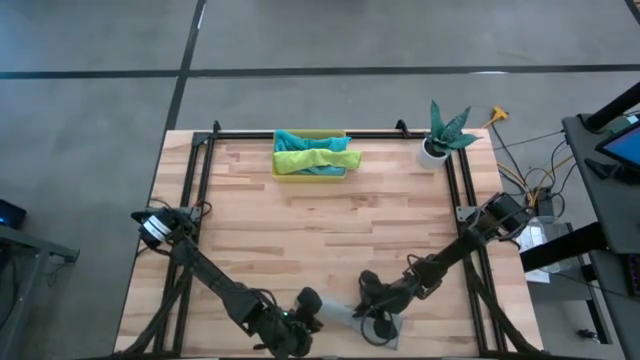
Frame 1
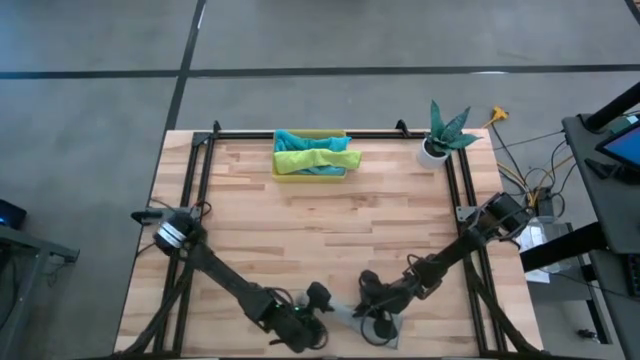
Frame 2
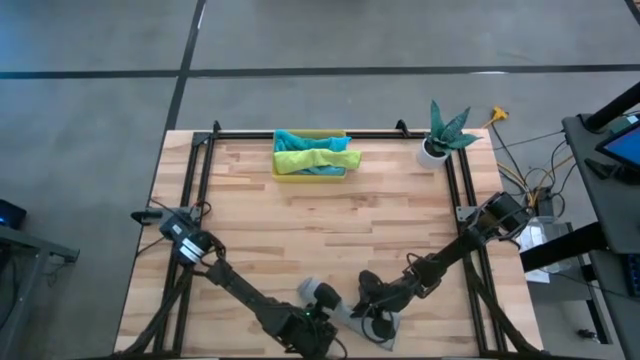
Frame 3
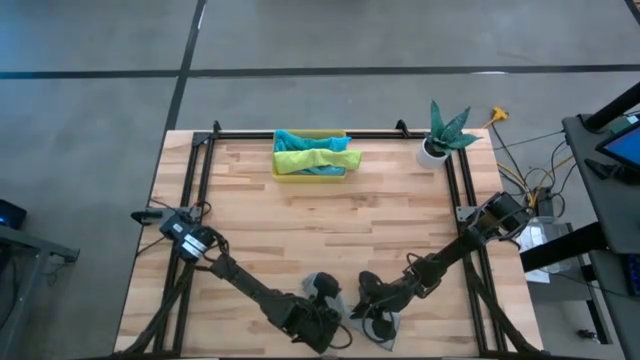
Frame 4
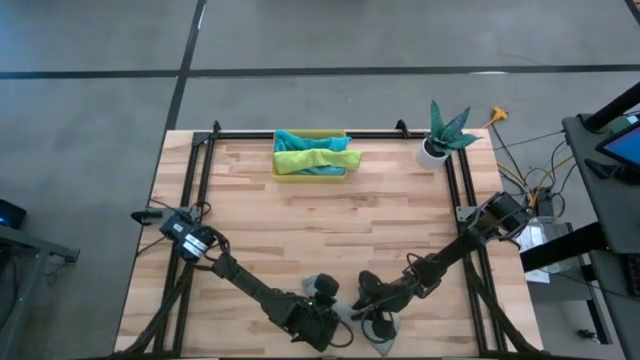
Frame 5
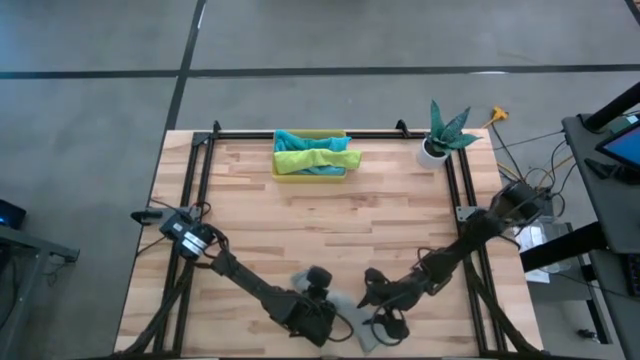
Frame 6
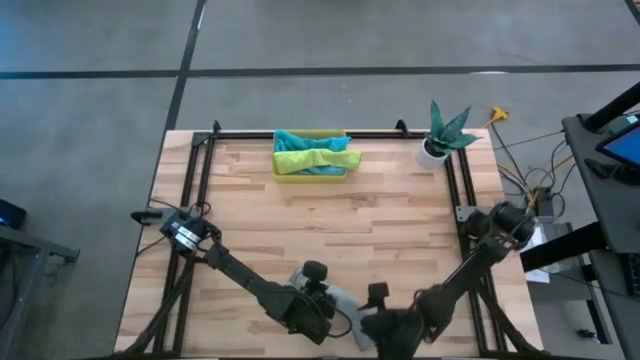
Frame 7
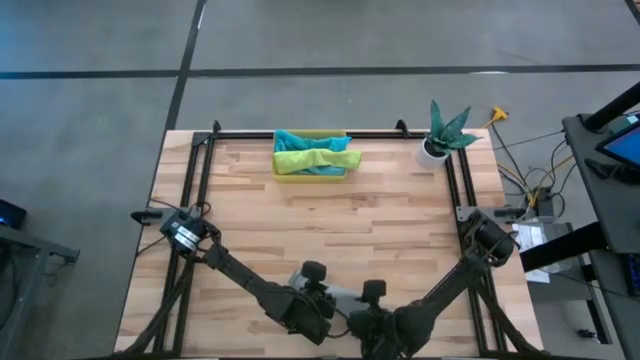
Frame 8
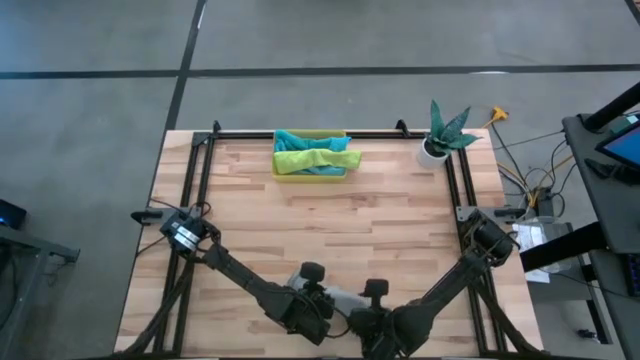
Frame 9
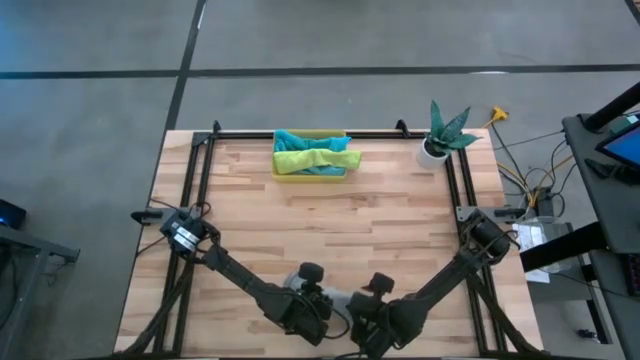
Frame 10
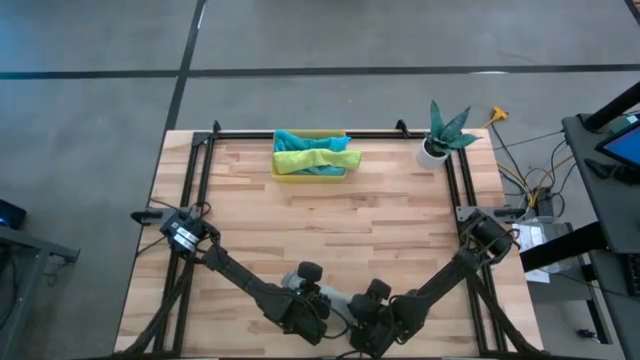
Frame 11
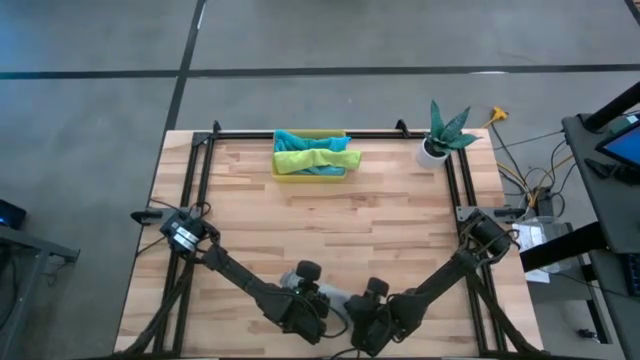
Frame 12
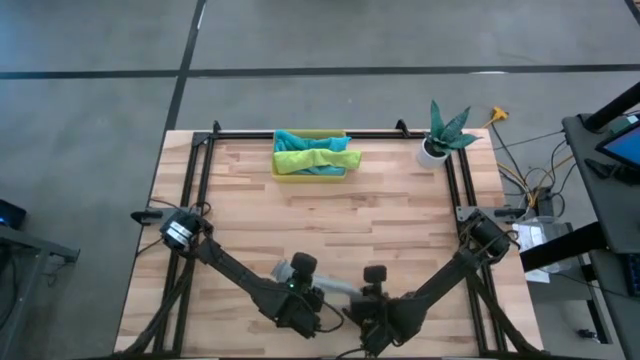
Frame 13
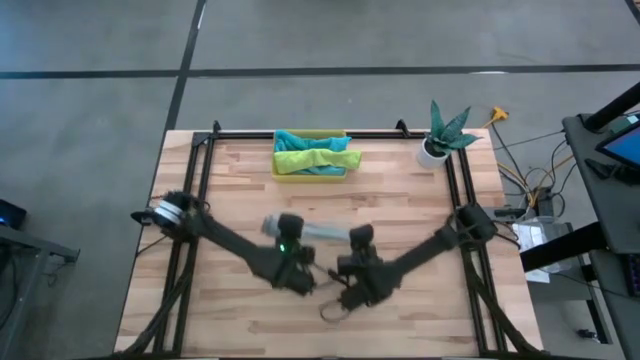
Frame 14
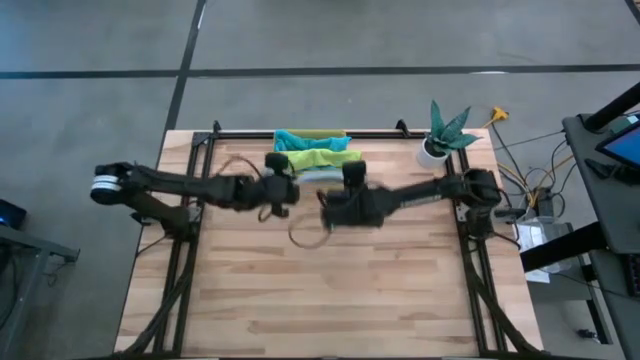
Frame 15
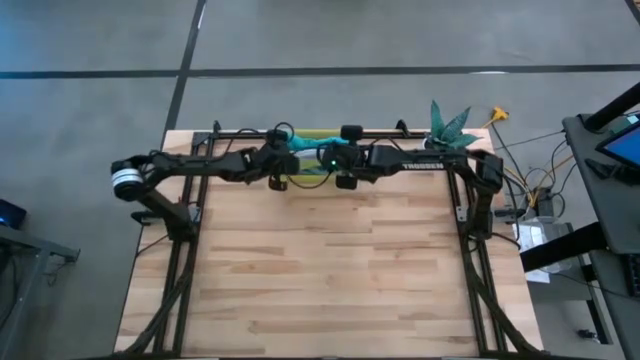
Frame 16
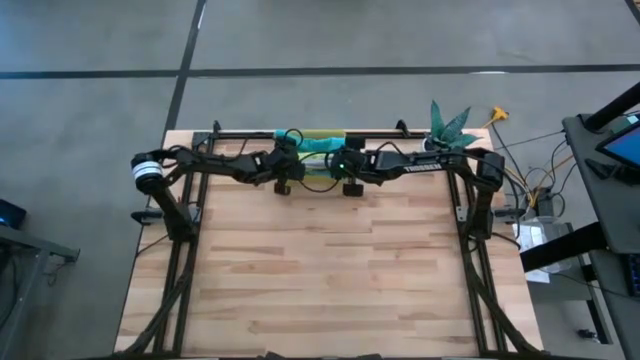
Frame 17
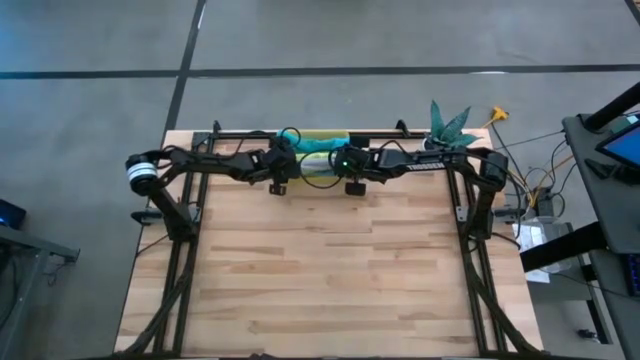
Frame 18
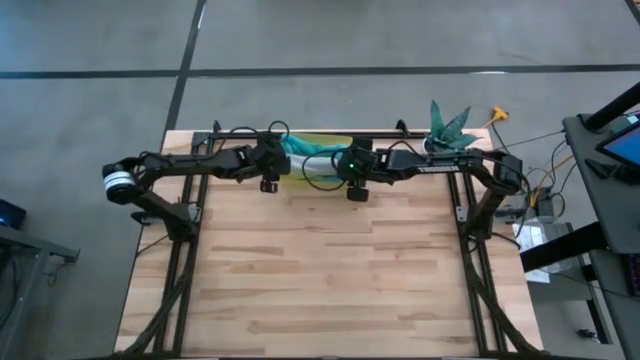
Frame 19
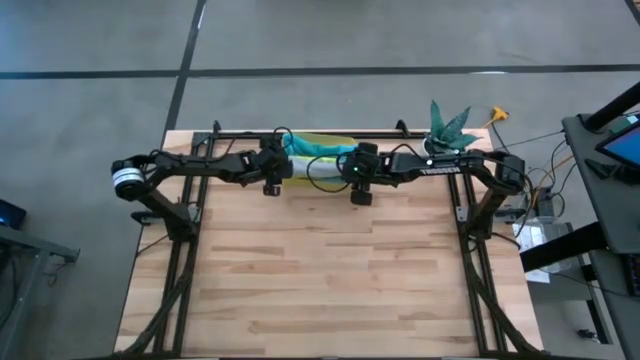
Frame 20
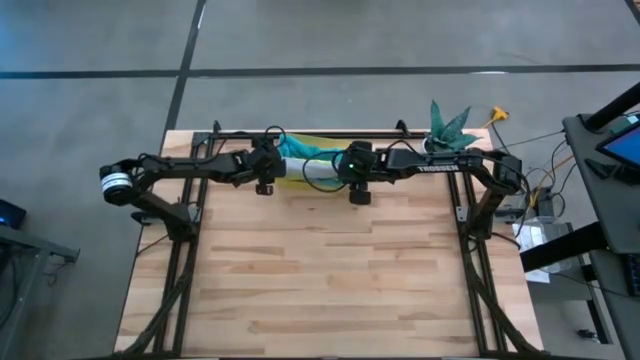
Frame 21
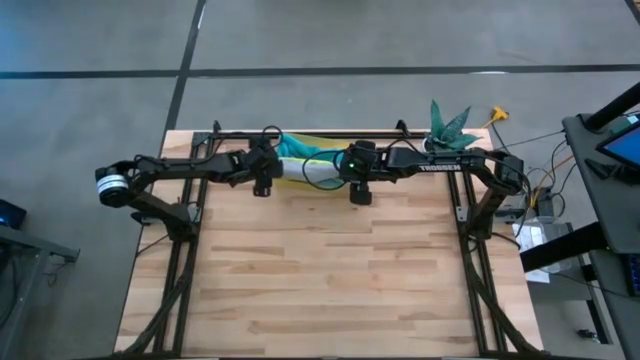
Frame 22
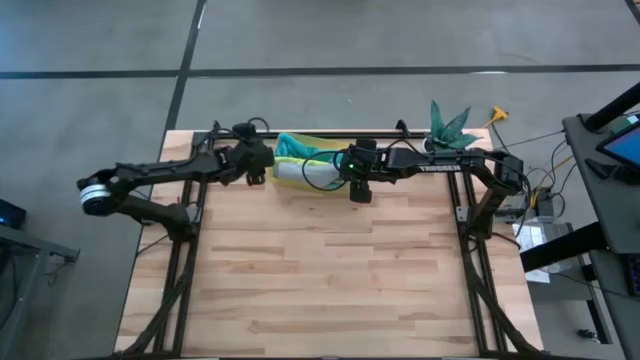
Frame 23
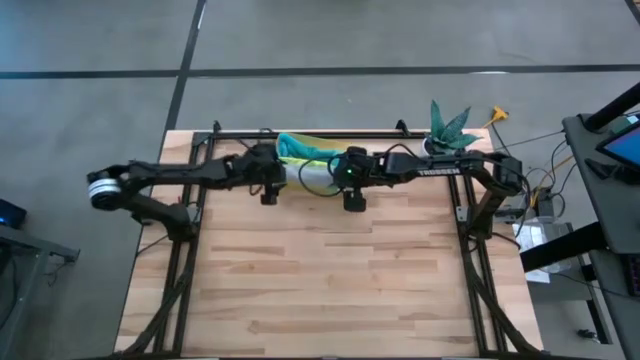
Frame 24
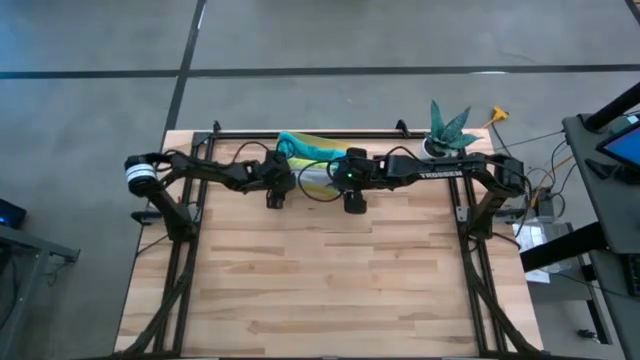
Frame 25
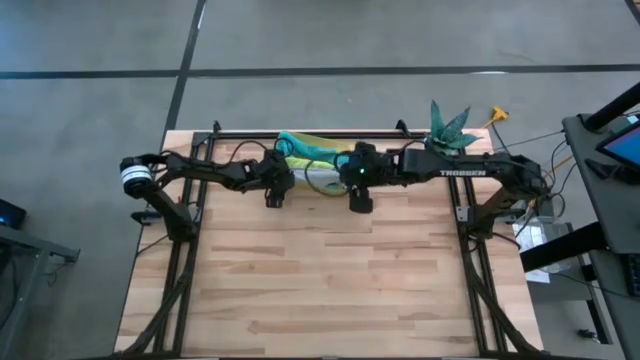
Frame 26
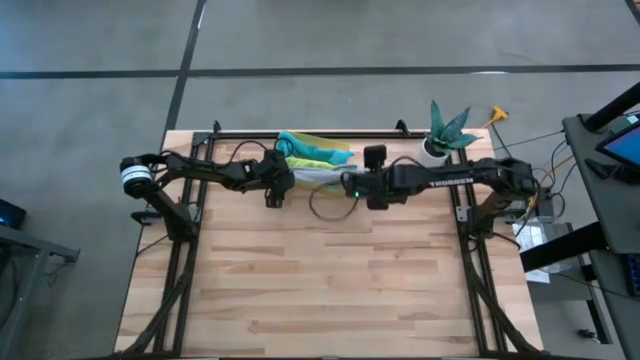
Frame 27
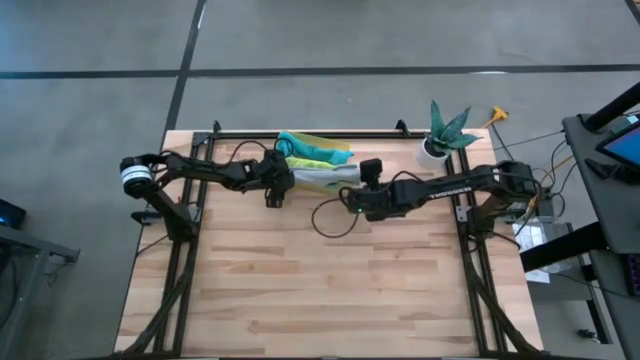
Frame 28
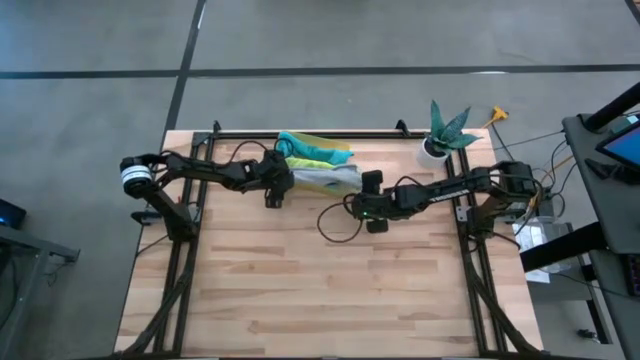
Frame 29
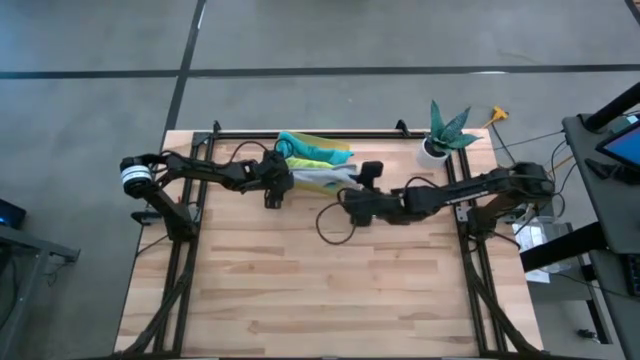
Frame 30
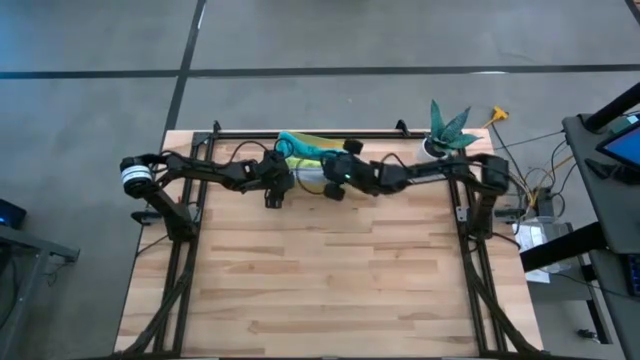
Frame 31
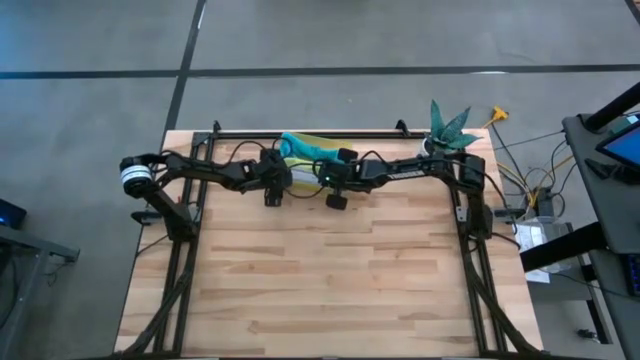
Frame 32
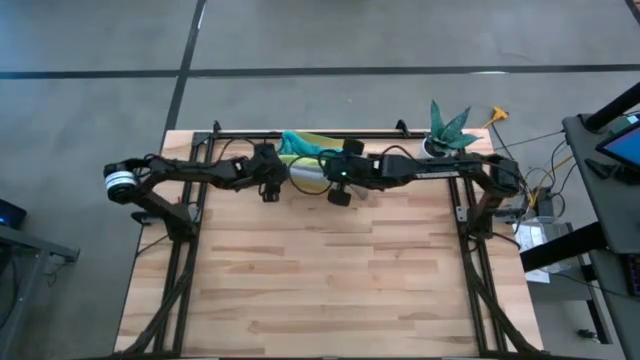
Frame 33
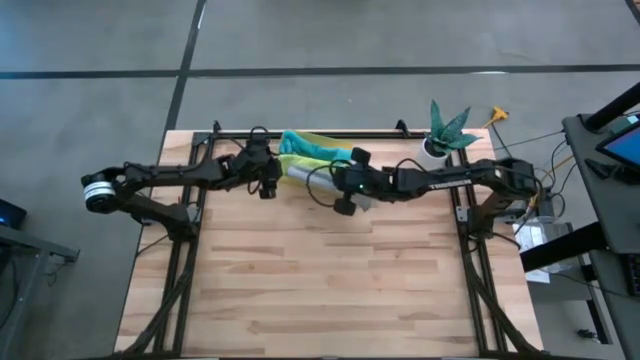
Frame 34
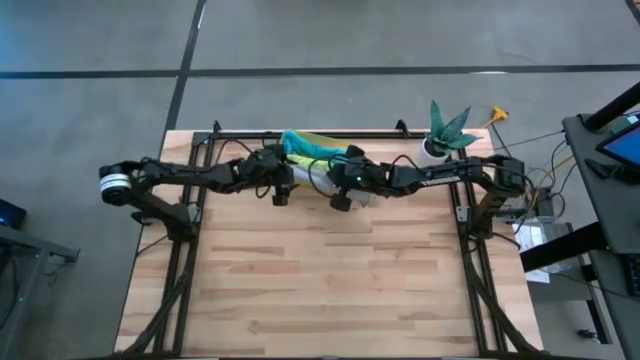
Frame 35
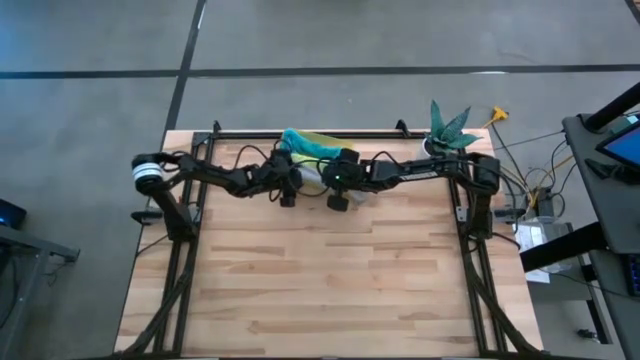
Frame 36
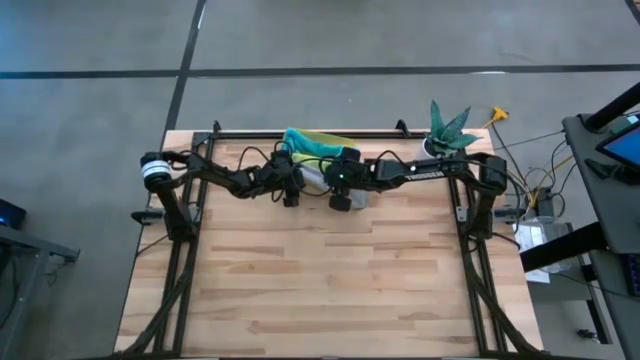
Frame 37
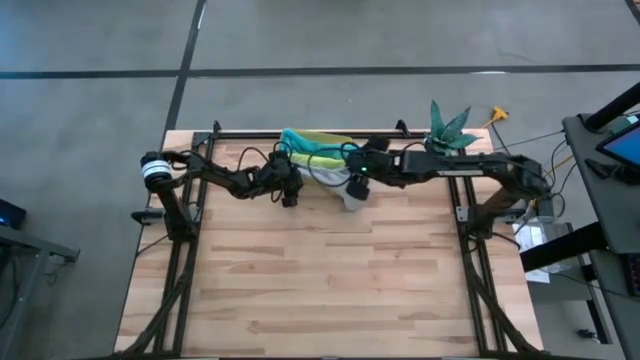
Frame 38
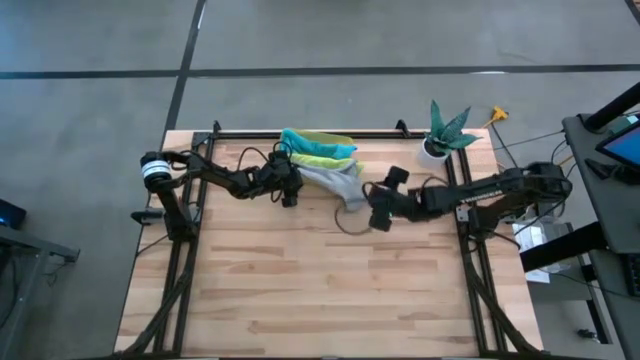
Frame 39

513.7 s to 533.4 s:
Task: Roll microfiber towels into tight, uniform cylinder then place into a basket
Put the rolled gray towel into the yellow bin
